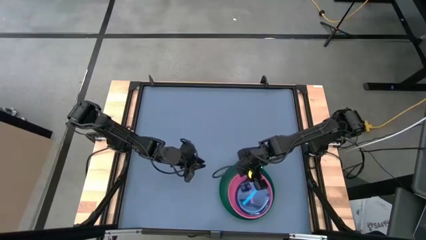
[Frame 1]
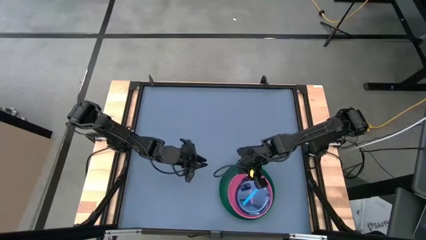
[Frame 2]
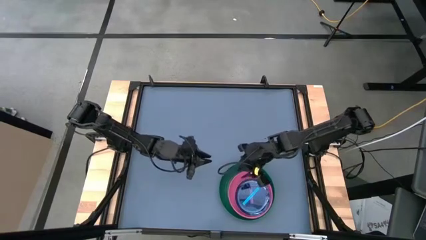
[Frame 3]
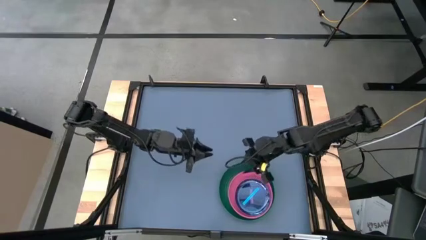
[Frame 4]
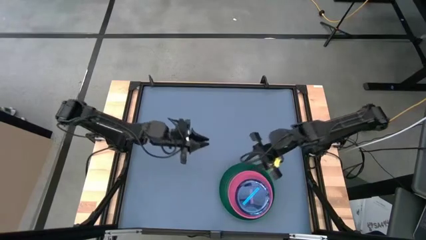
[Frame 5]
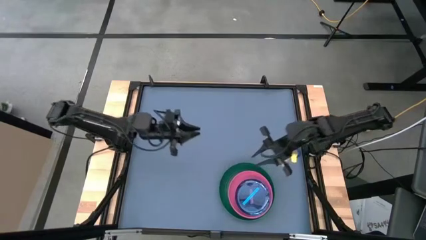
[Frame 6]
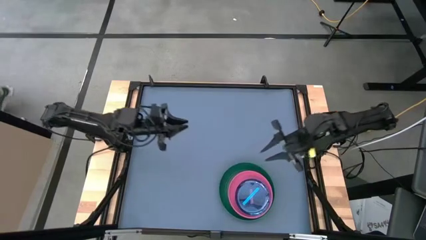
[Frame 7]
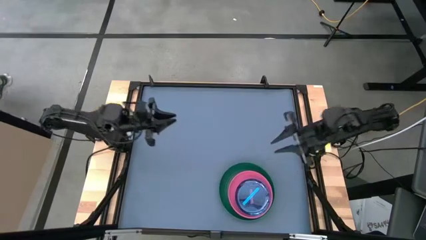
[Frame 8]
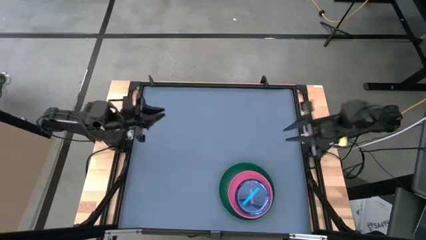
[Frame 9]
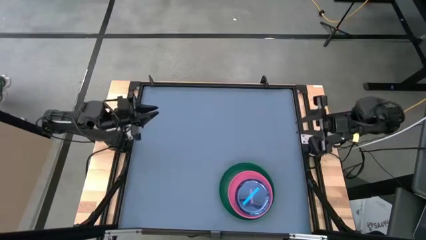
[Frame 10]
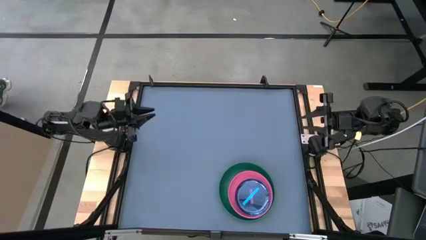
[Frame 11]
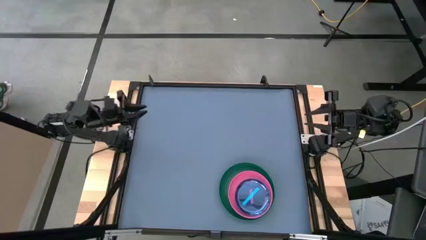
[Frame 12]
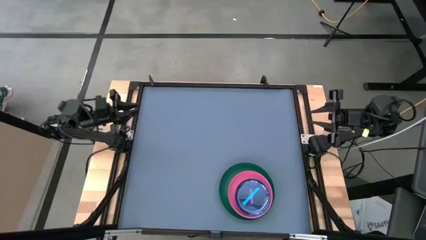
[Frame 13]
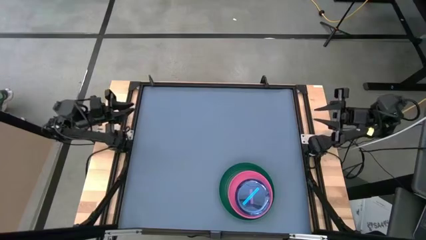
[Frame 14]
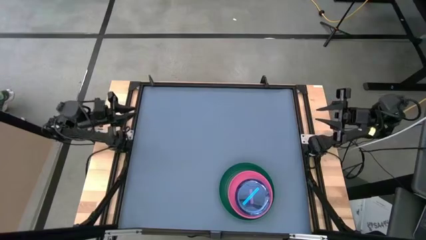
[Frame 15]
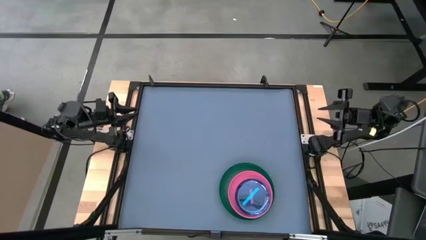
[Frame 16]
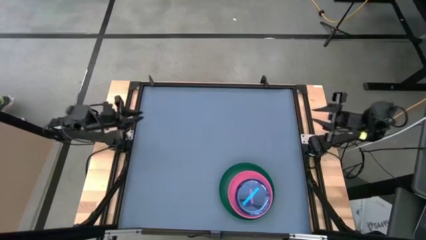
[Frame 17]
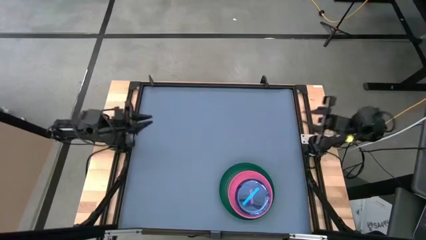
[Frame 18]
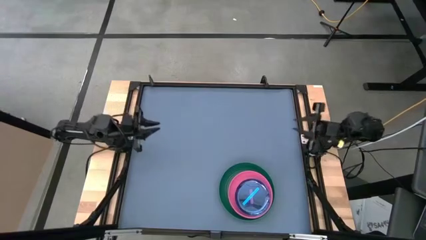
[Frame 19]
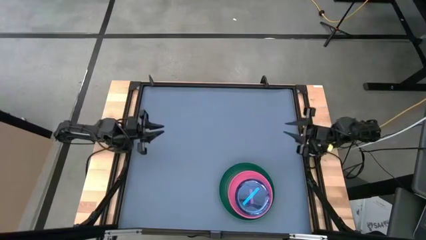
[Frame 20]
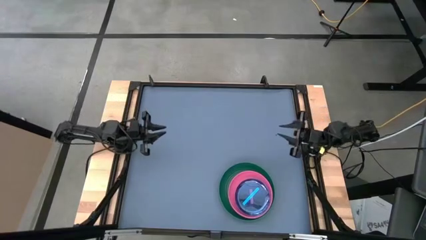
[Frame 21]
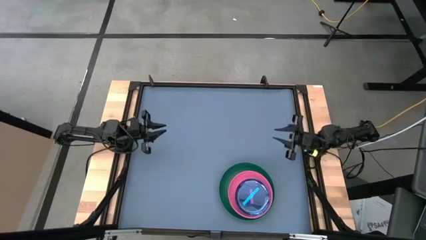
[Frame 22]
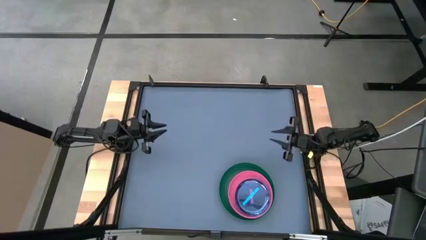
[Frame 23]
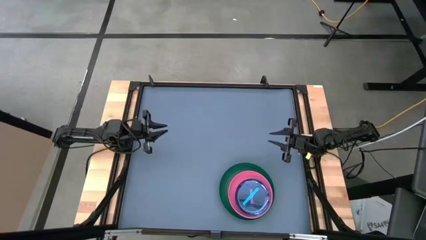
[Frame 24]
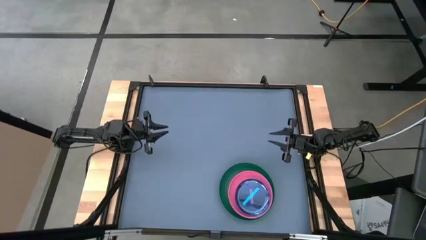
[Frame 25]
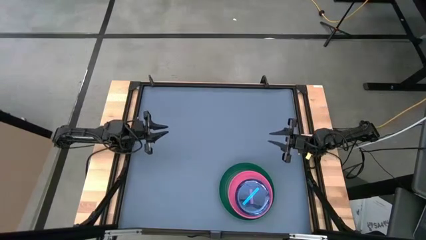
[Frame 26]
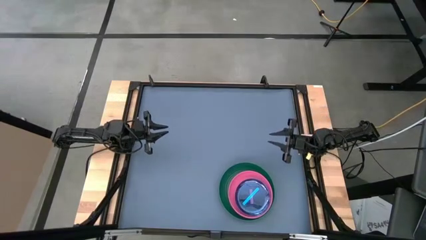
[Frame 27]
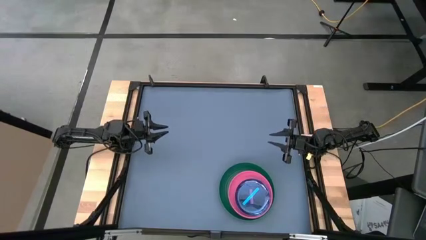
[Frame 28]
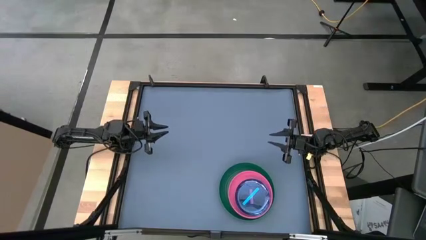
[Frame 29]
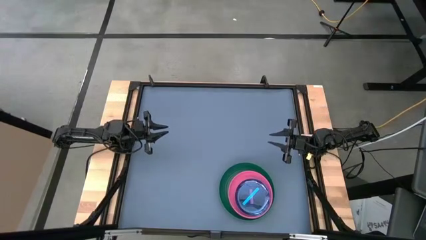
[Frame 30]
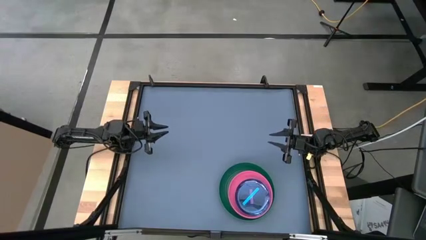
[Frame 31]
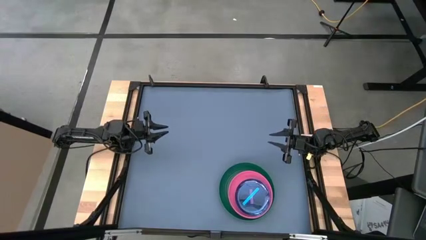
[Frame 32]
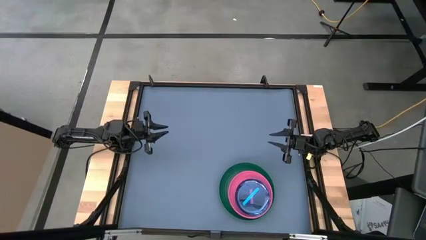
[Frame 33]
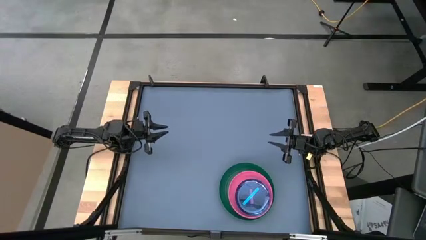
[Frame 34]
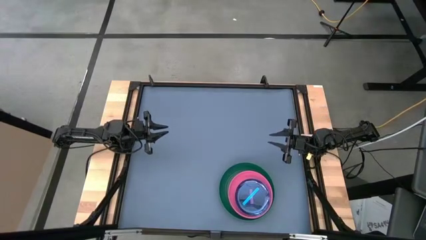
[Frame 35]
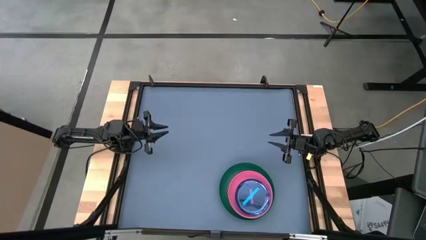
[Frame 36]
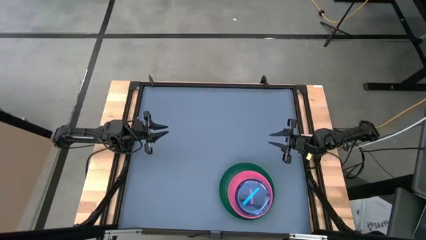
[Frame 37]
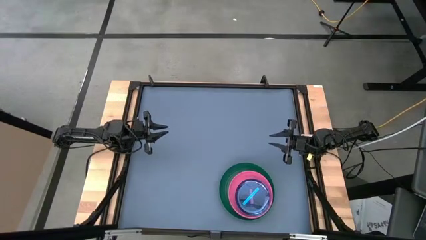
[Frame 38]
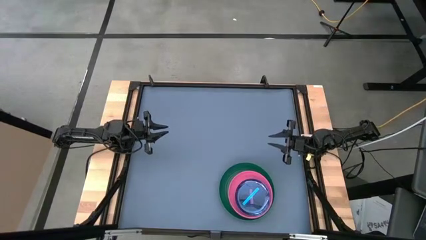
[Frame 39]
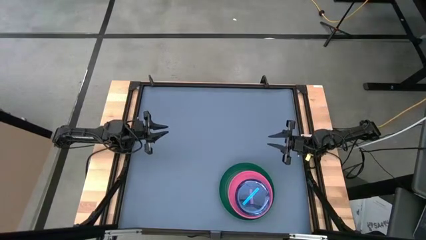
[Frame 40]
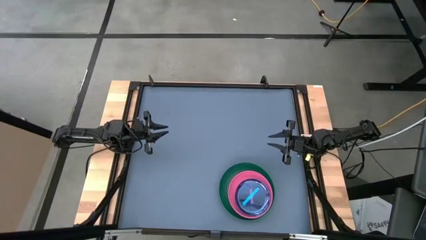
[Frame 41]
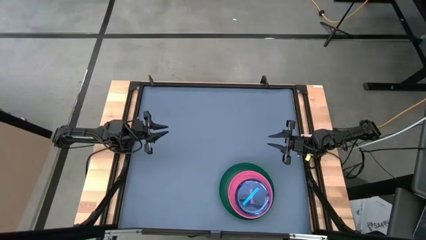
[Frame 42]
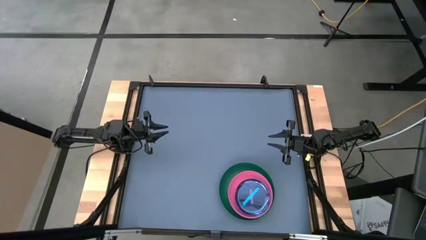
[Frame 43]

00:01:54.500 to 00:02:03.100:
Task: Stack plastic plates
Return to Home Position

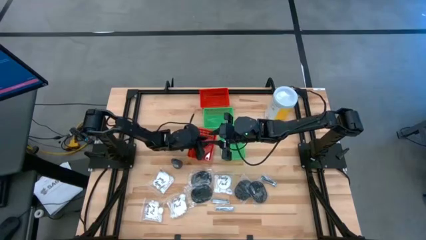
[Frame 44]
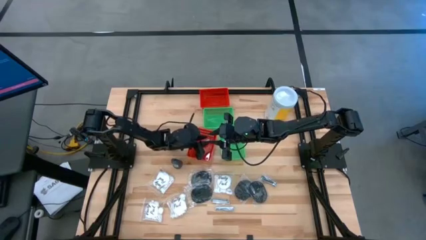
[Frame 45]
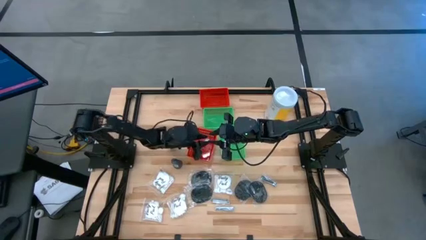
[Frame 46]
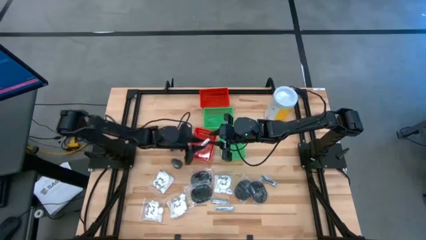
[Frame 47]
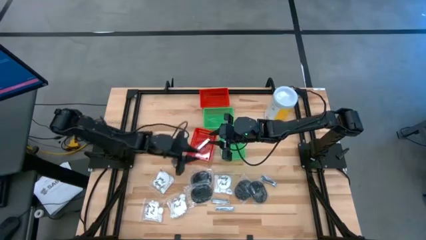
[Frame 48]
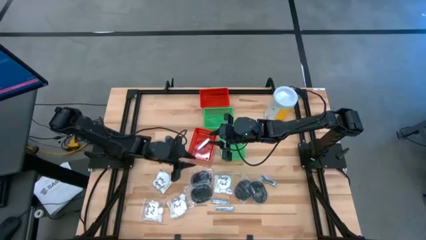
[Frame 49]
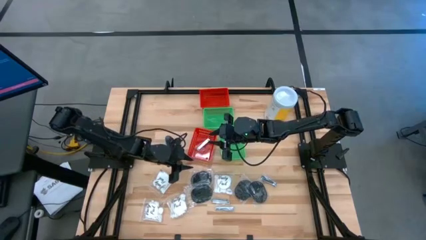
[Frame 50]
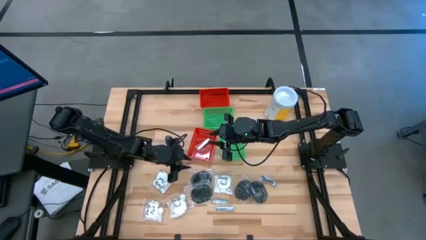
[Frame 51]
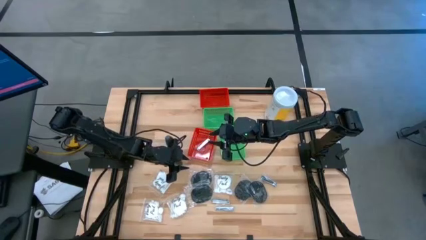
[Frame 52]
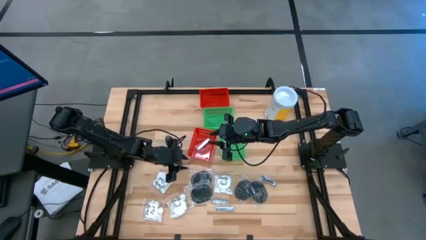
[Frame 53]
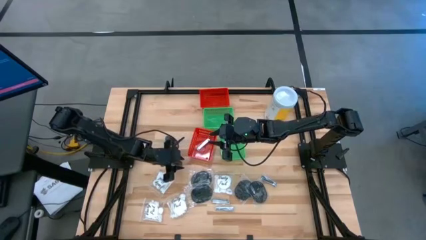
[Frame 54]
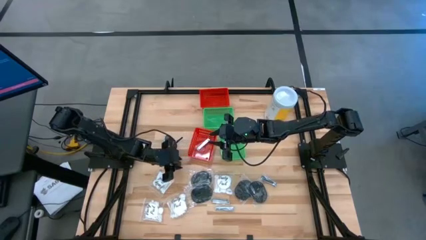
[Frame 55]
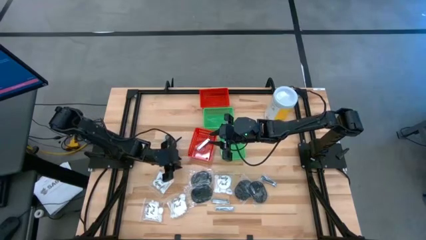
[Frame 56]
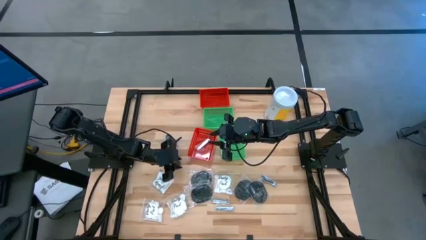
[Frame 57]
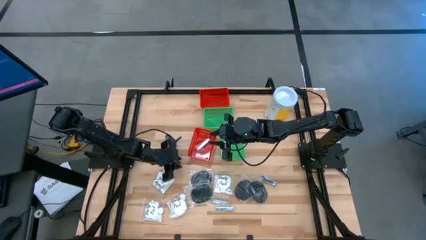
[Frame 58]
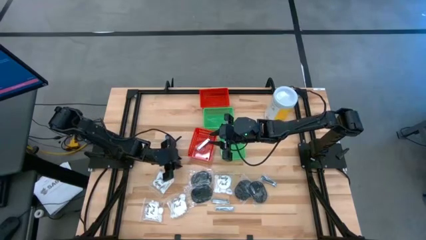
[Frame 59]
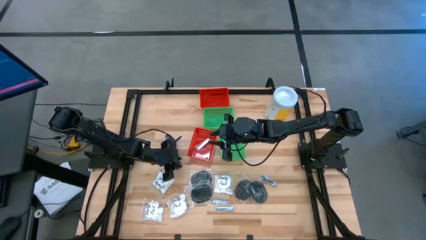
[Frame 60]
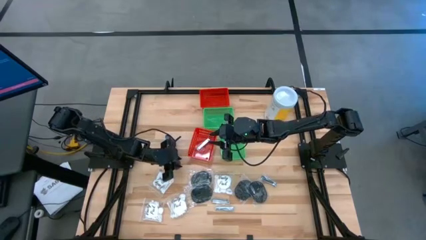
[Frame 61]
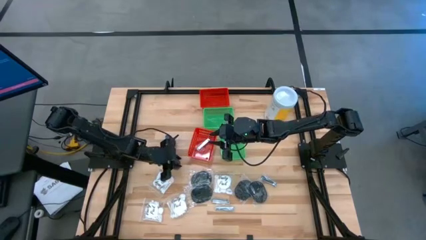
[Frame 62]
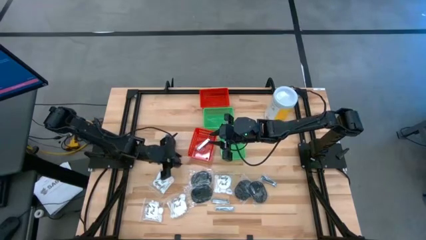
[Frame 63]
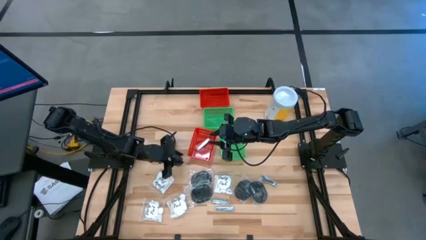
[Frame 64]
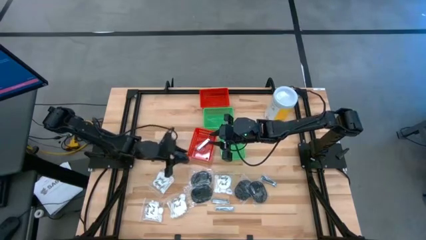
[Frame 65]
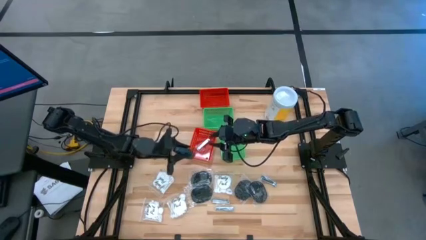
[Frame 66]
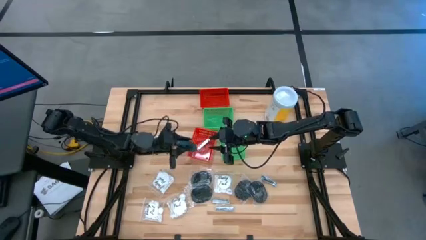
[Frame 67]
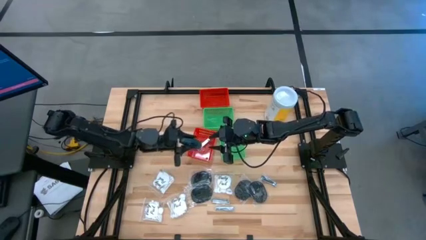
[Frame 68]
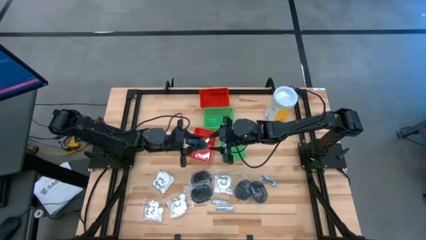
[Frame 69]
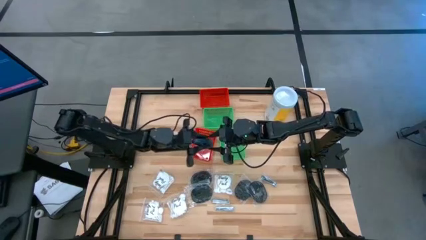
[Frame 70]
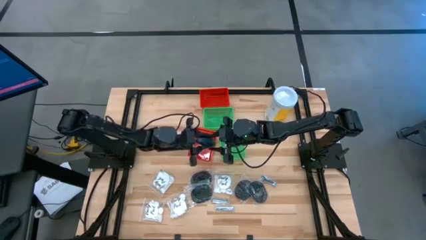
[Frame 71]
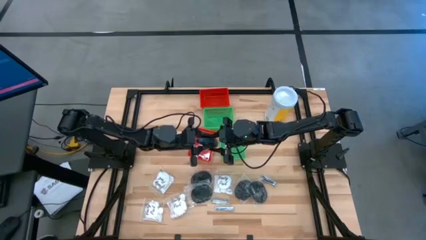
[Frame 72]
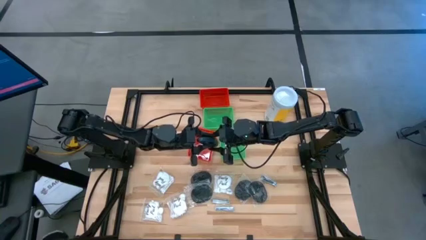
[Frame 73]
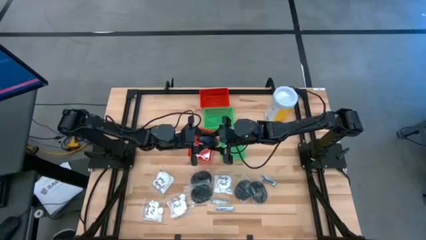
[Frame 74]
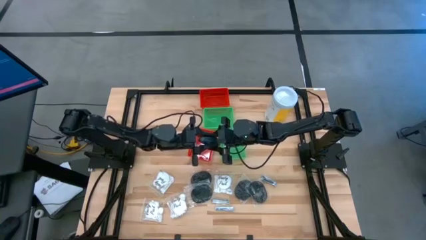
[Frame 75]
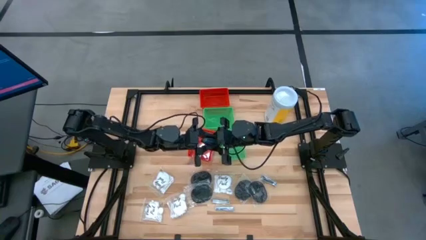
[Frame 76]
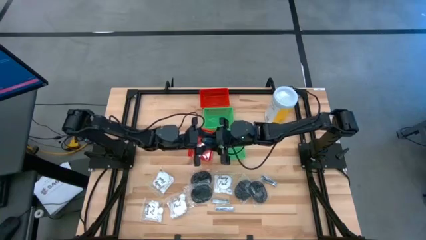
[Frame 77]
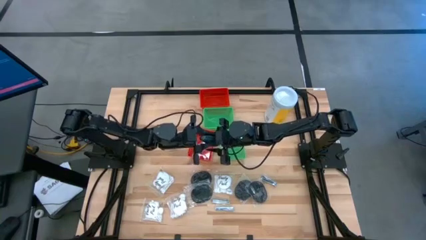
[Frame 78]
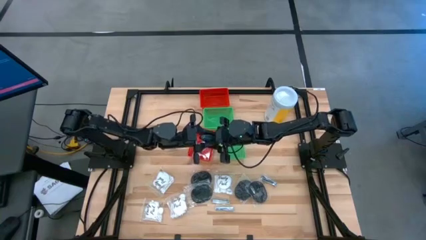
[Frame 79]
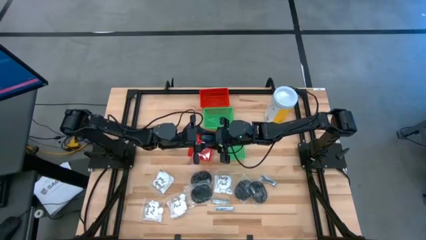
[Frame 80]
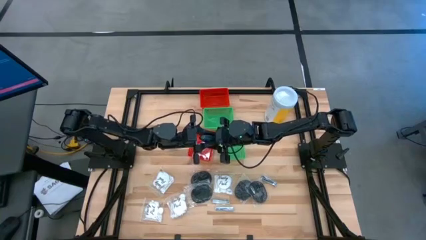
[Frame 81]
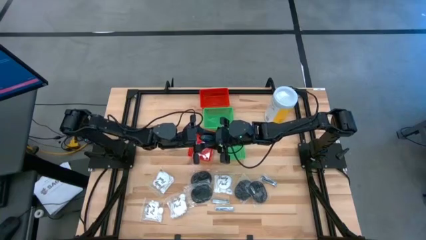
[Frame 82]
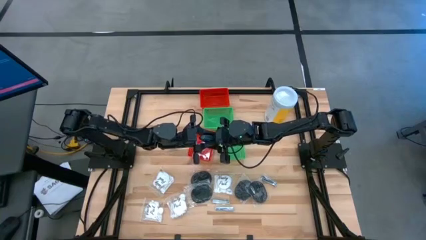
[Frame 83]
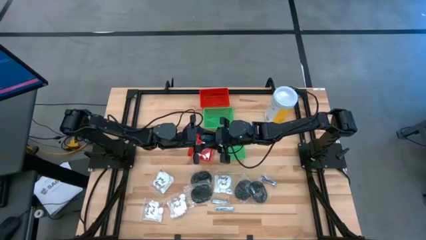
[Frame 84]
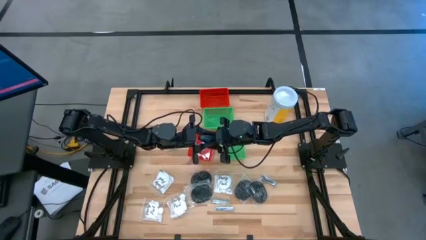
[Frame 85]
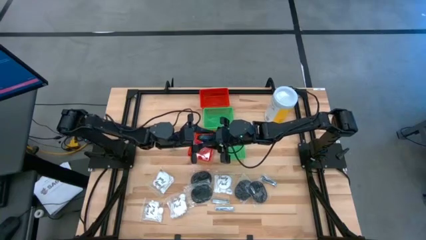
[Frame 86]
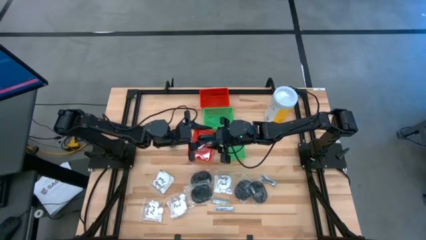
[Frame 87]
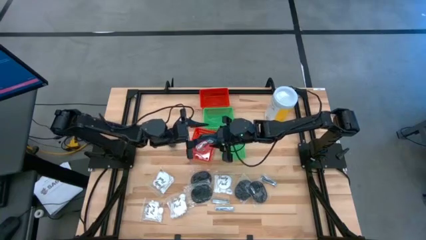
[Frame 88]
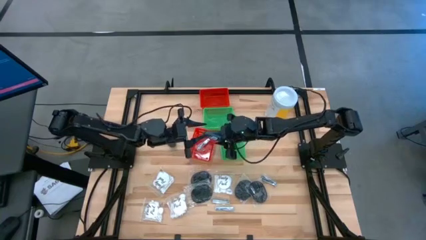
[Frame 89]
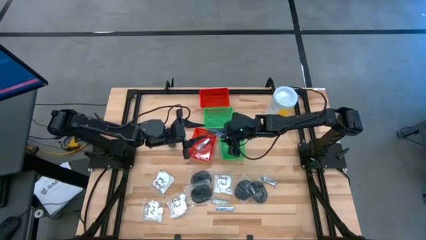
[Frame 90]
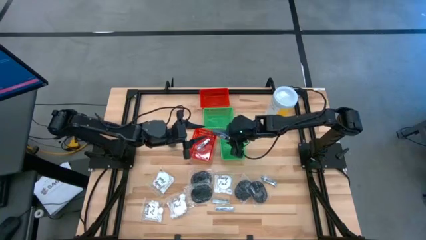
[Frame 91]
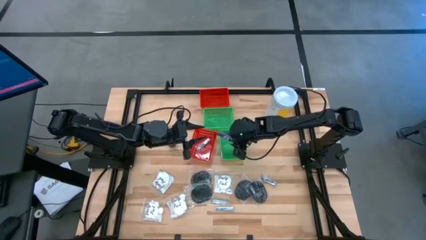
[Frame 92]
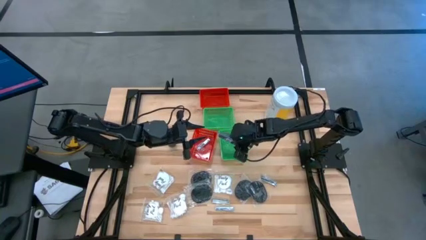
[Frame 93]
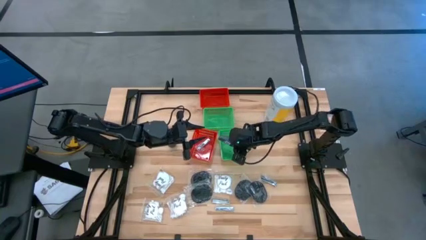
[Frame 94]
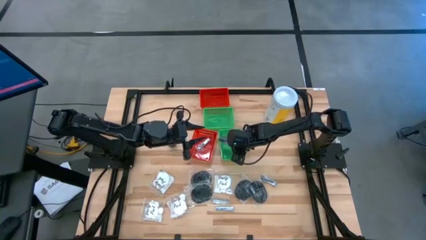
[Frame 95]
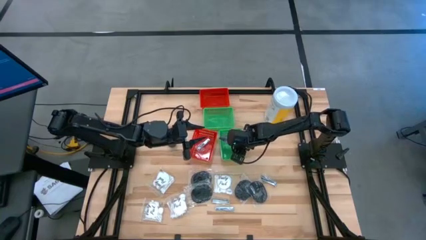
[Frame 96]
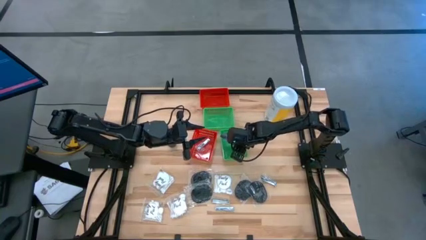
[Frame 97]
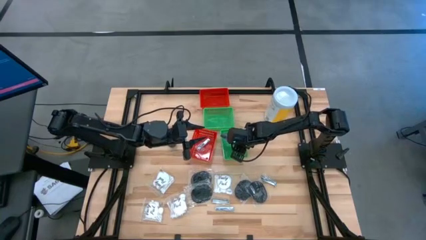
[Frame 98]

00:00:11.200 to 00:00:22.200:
Task: Pick & Place Travel size toiletries
Put the black deodorant into the bottom green bin
